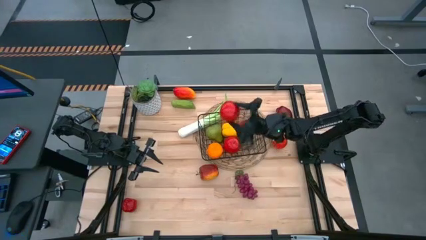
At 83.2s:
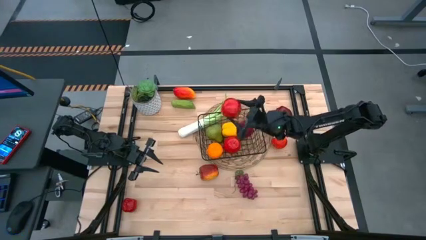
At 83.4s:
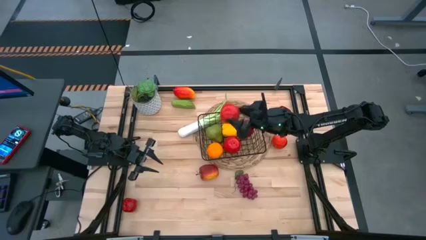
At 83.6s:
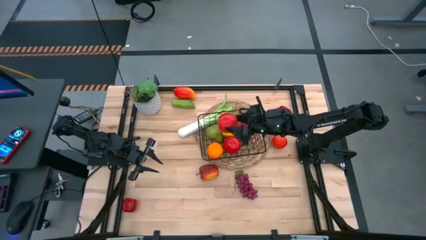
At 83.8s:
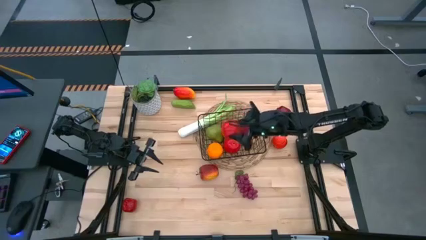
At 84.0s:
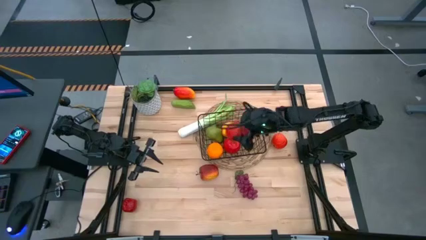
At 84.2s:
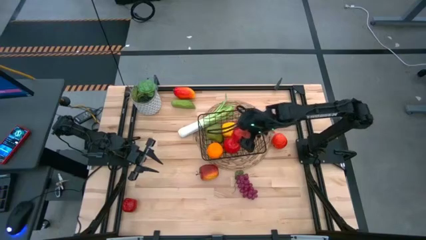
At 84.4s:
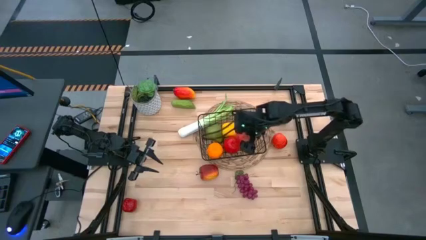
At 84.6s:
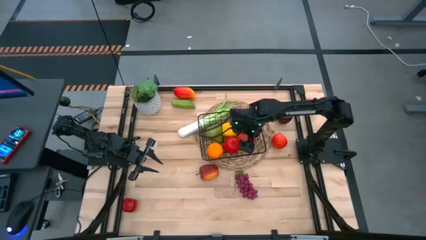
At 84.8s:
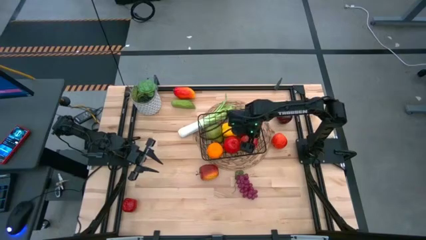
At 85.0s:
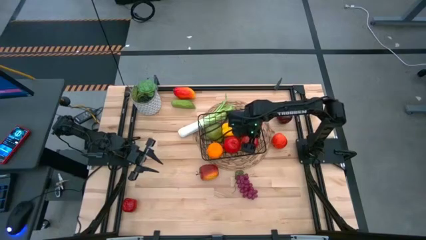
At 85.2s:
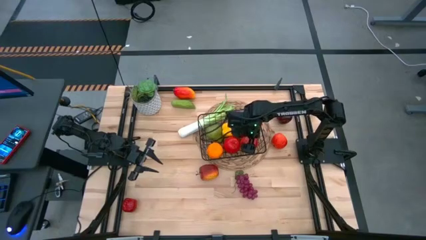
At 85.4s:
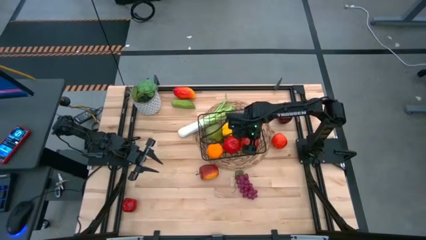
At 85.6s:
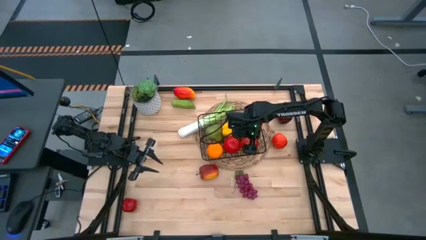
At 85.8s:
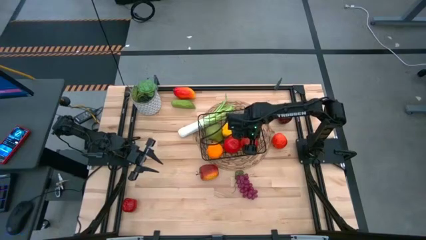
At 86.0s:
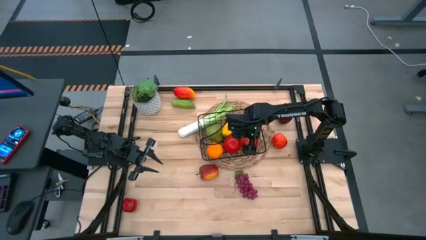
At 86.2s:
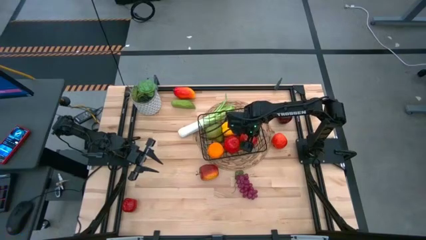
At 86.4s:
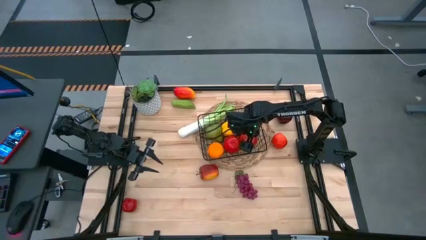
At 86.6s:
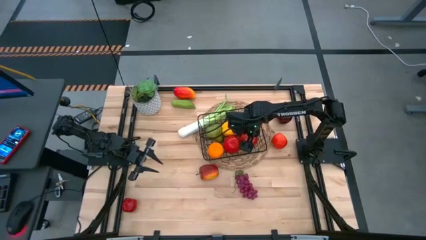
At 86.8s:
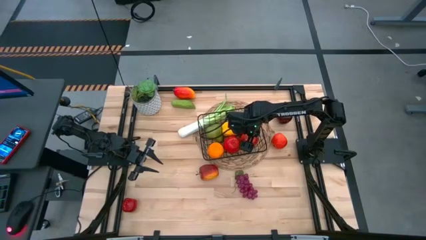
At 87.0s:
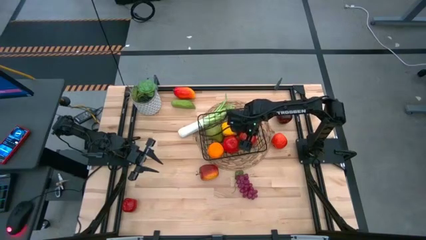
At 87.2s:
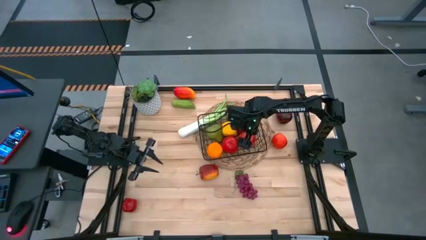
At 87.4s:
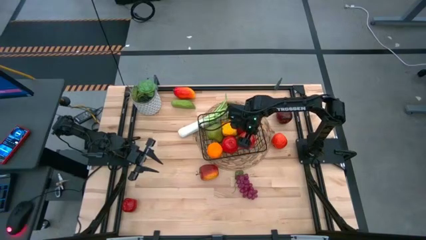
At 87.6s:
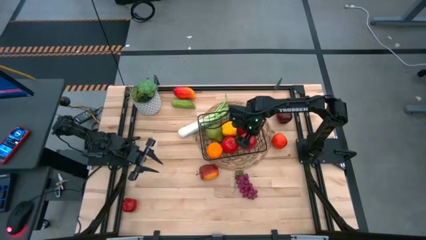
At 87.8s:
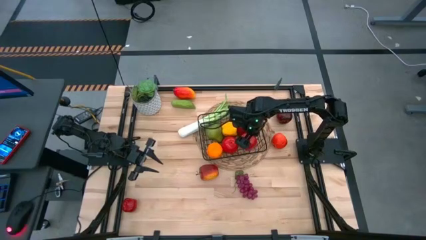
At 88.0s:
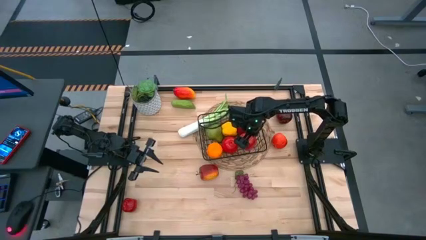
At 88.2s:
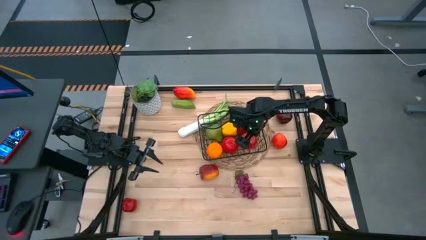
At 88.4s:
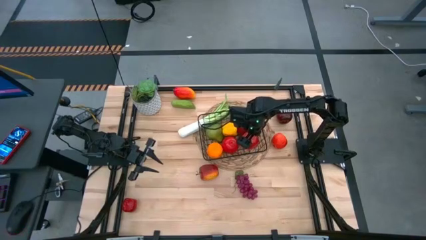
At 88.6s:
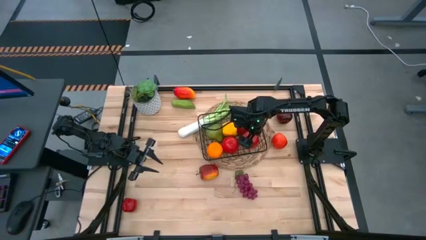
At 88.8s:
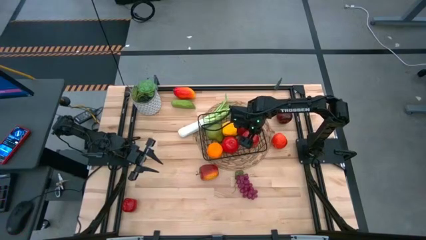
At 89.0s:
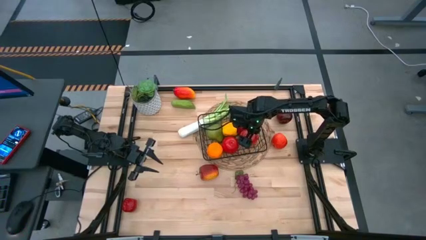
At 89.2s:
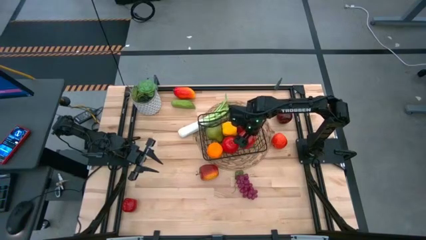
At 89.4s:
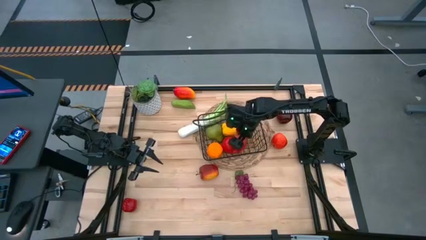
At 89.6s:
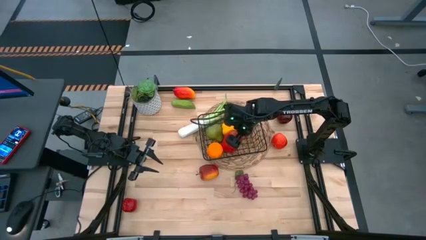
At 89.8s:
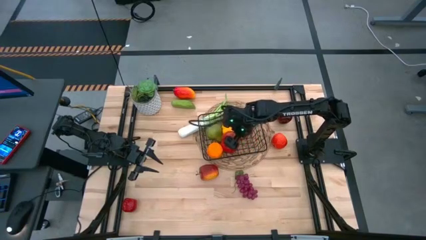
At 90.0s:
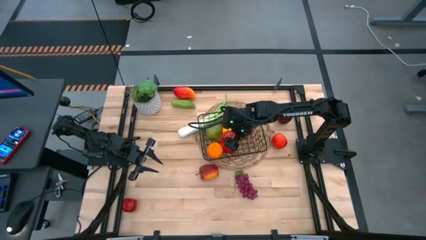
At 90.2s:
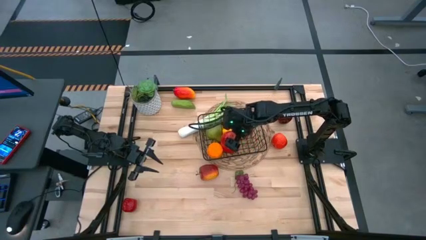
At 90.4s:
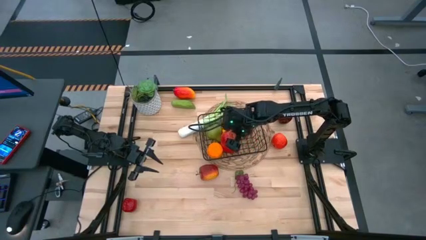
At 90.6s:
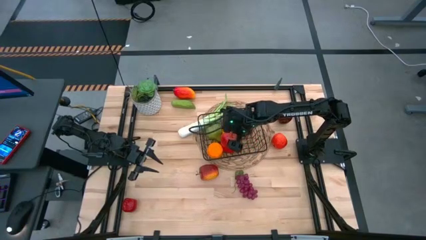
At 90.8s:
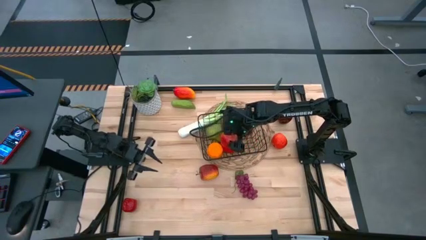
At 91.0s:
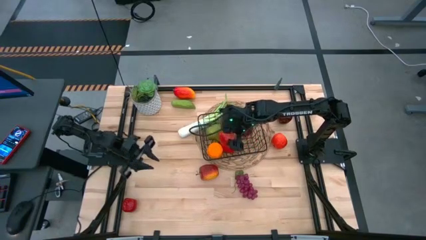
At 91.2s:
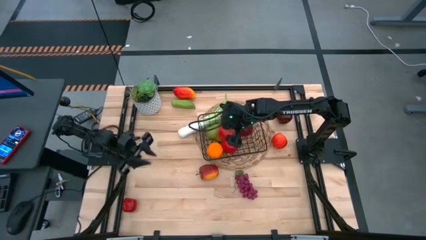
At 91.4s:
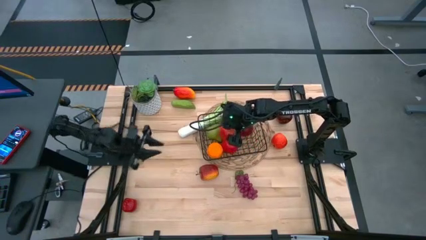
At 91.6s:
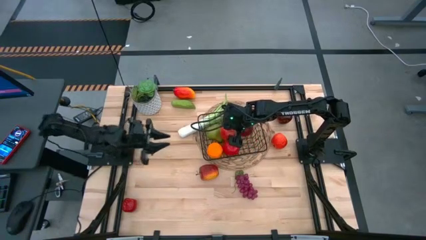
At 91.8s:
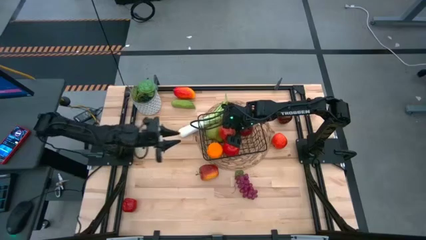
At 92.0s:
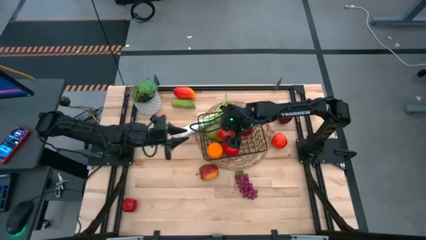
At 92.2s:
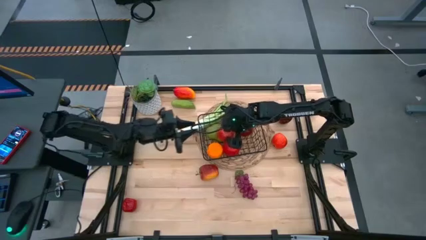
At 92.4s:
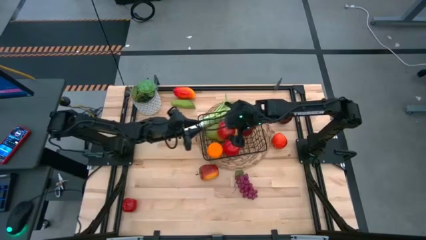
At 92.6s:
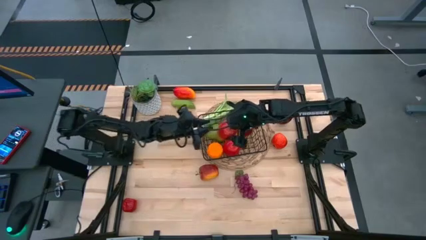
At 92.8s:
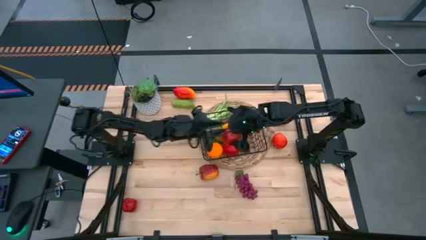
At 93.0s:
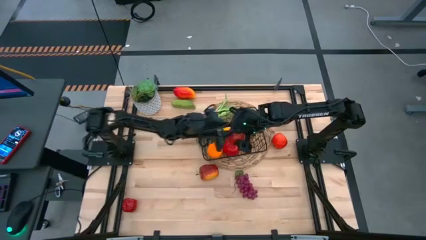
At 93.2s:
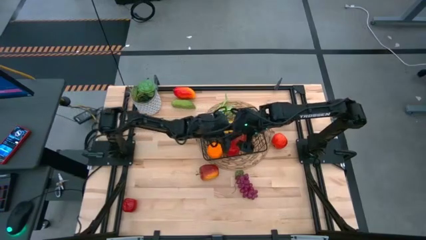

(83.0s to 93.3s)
Task: Build produce basket
Put the apple into the wire basket

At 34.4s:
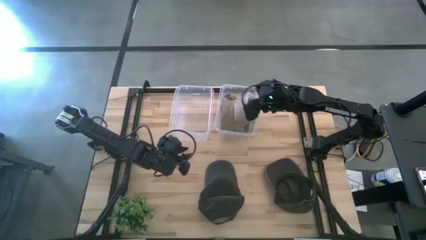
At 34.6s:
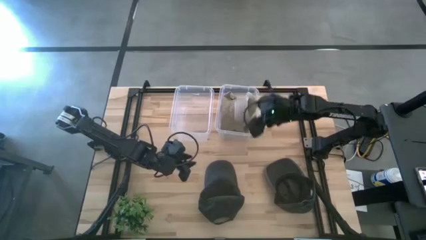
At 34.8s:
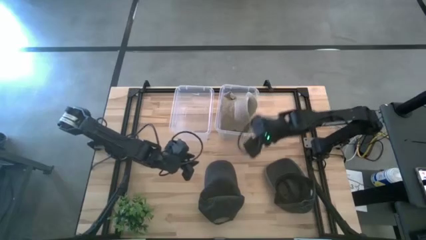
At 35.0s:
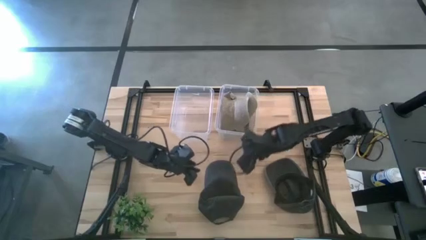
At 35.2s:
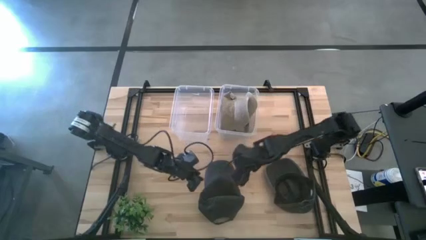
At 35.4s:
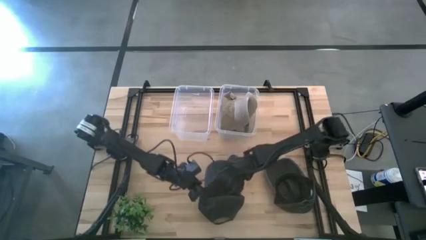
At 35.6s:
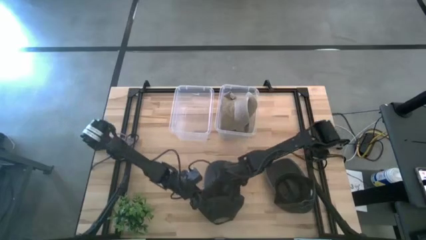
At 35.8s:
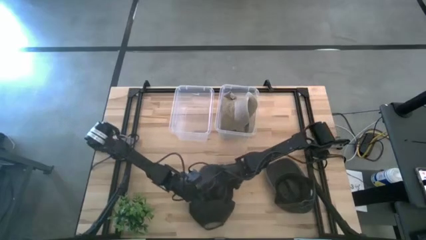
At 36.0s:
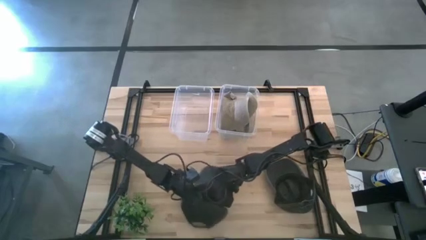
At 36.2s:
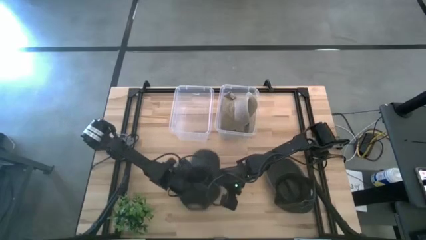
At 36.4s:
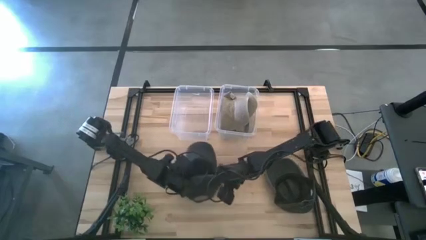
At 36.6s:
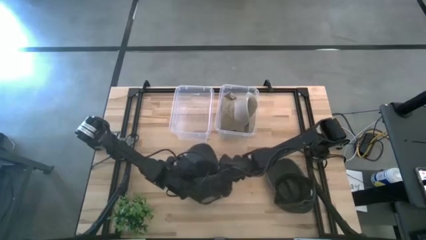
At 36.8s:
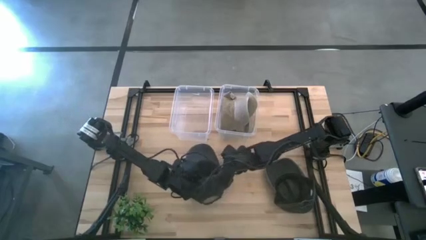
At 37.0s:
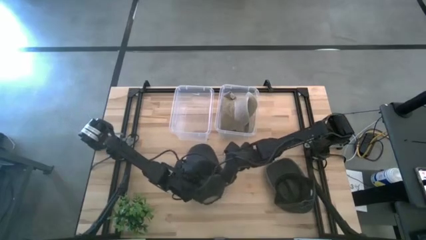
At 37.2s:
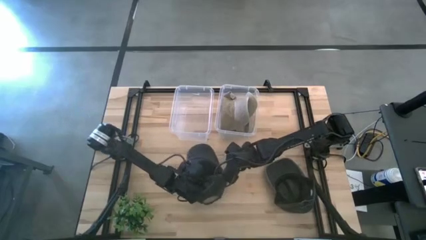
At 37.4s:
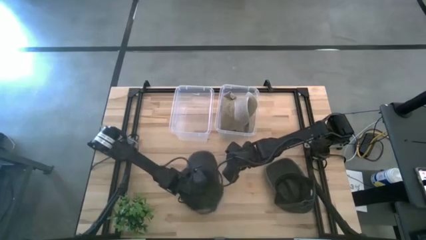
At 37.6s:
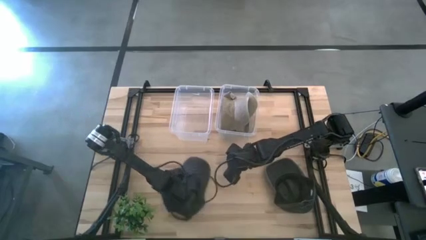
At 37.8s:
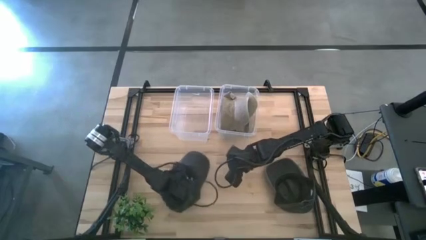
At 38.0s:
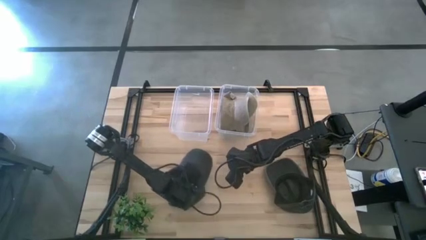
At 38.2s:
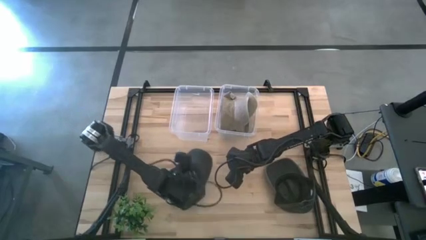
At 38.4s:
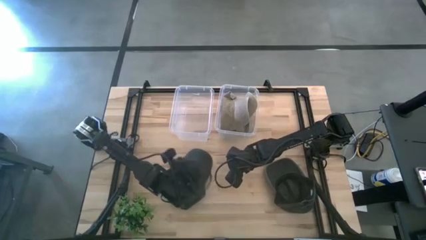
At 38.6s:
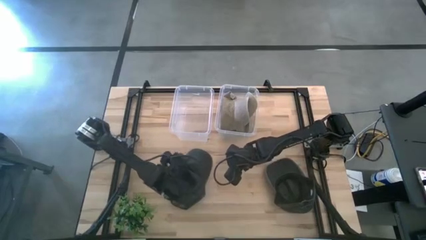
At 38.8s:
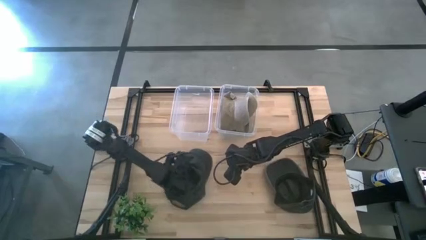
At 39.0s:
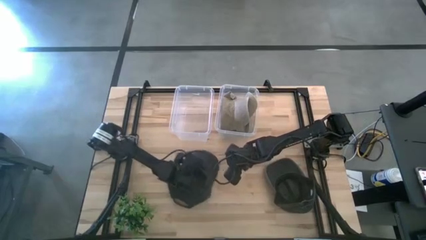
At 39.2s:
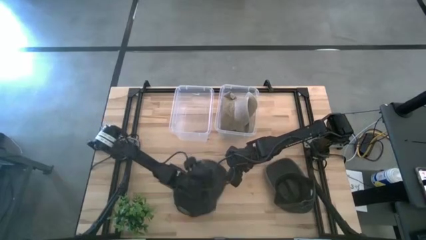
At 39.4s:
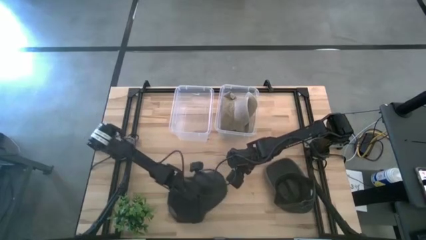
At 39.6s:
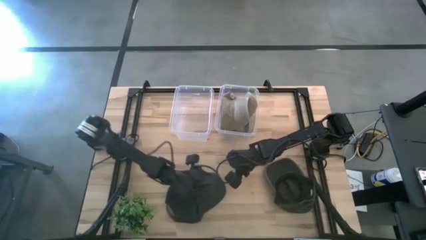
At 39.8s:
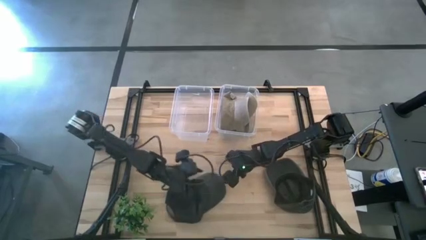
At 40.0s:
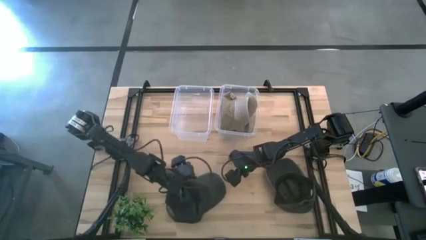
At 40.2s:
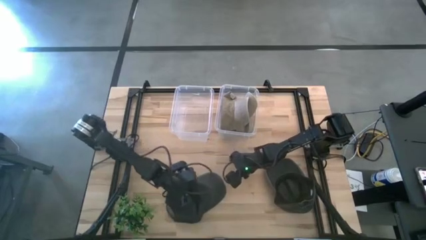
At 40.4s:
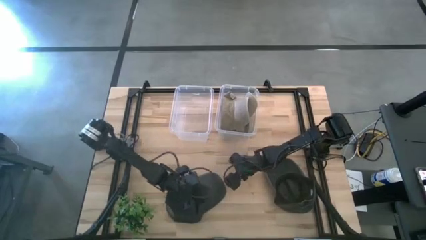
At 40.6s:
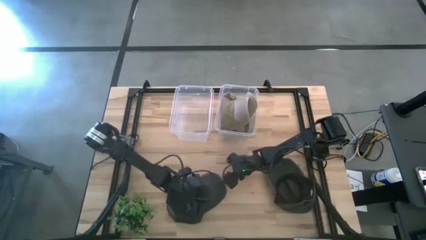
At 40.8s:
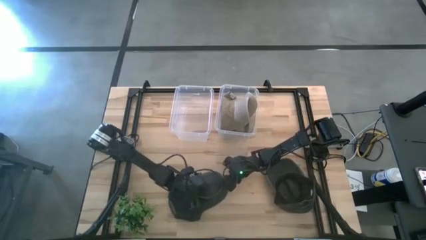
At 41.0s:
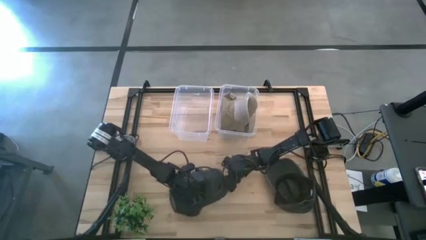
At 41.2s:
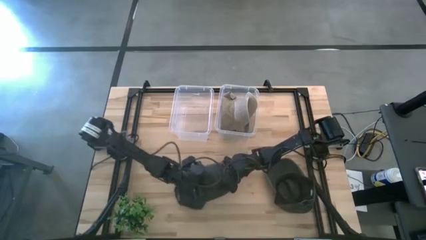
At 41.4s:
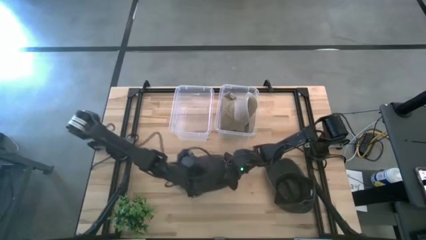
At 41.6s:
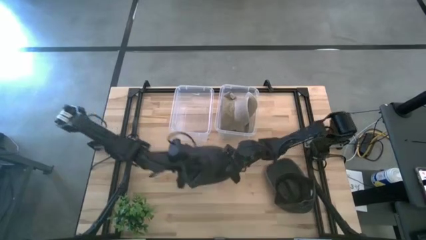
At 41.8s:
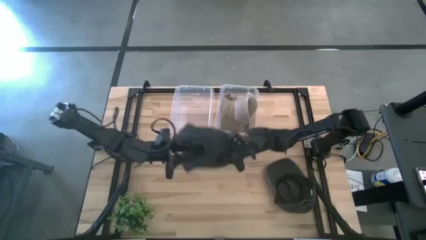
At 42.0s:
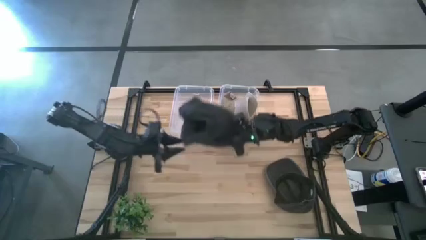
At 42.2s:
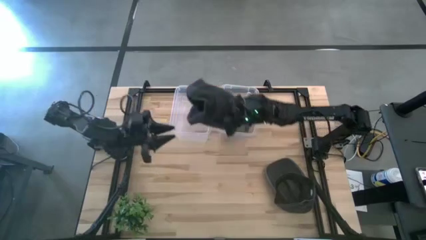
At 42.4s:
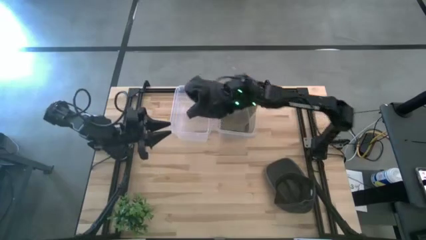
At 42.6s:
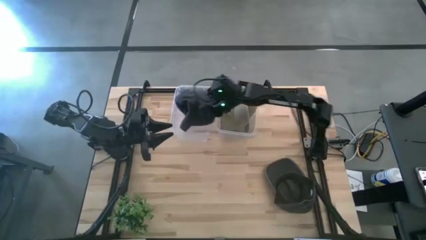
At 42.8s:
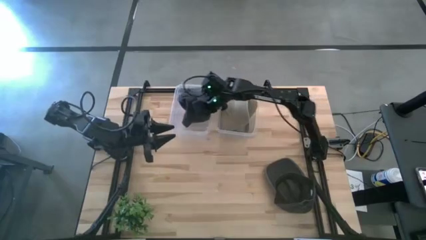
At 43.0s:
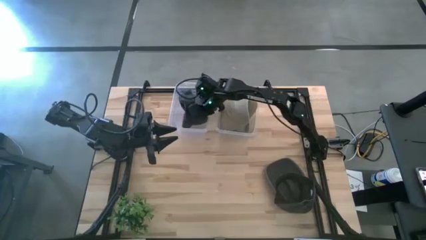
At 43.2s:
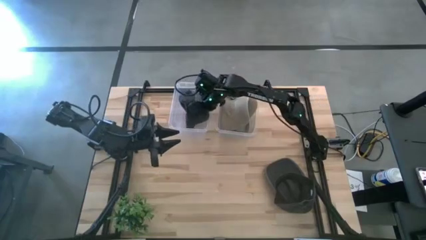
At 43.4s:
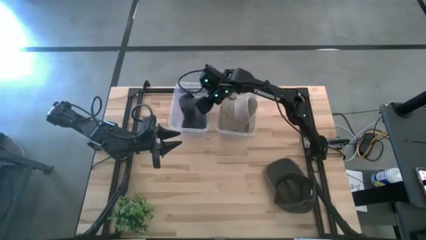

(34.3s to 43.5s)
Task: Pick & Place hat
Put the left dark green cap into the left transparent bin
